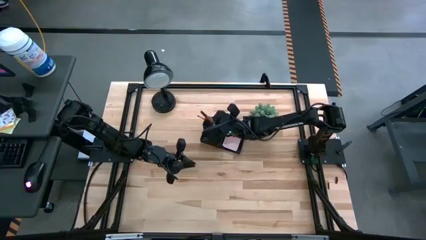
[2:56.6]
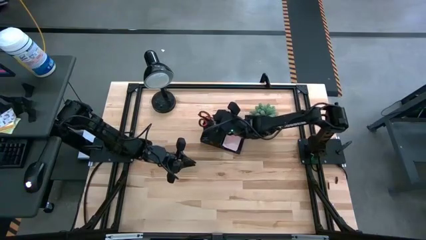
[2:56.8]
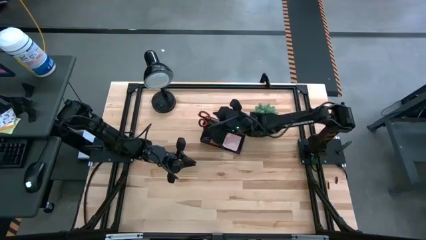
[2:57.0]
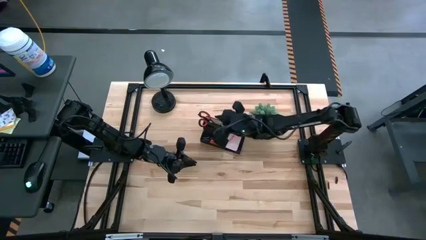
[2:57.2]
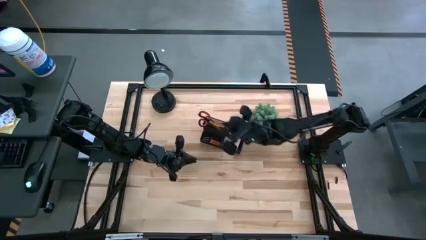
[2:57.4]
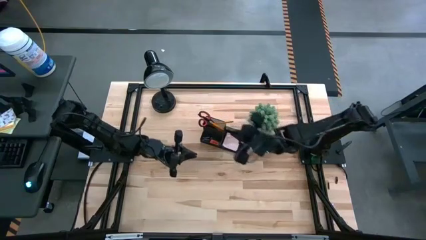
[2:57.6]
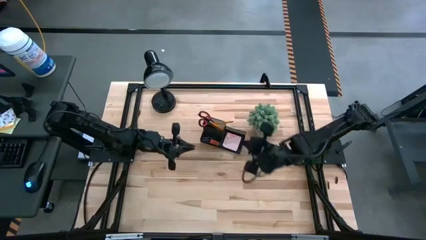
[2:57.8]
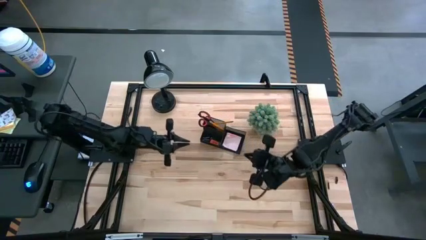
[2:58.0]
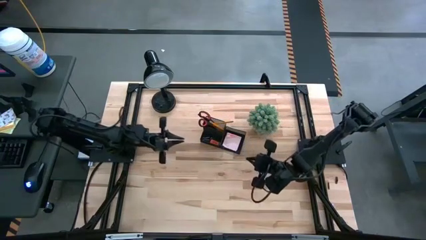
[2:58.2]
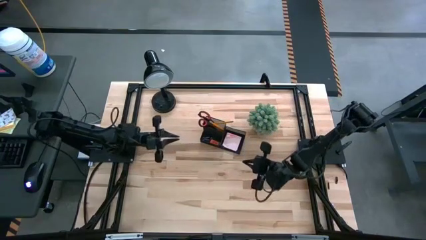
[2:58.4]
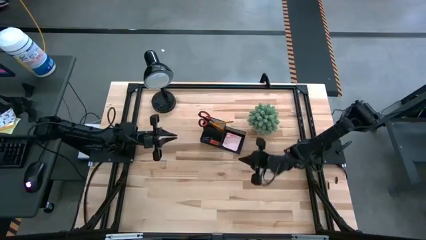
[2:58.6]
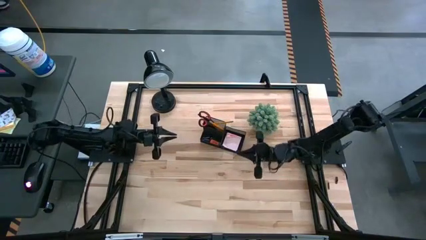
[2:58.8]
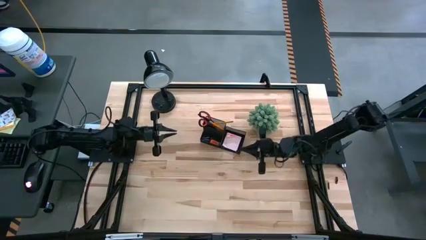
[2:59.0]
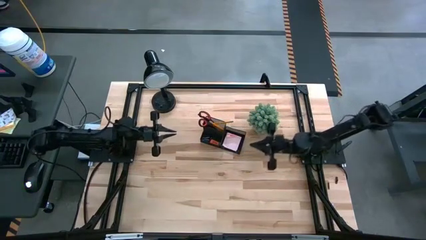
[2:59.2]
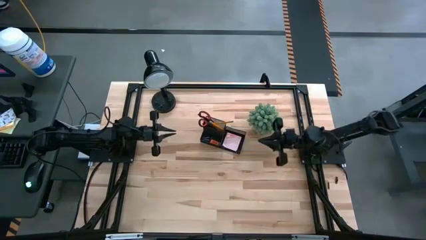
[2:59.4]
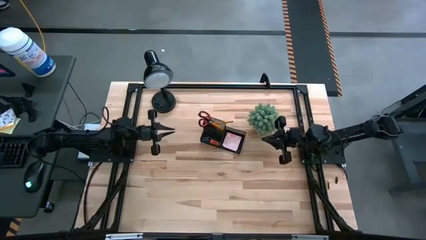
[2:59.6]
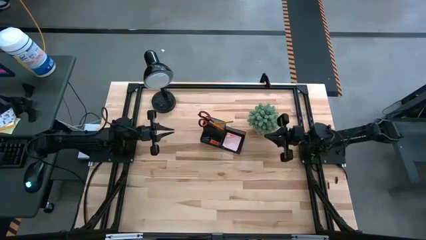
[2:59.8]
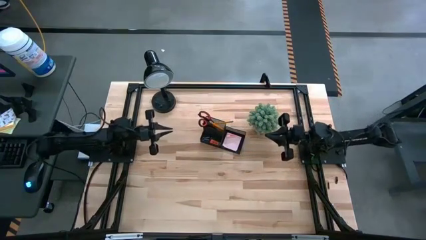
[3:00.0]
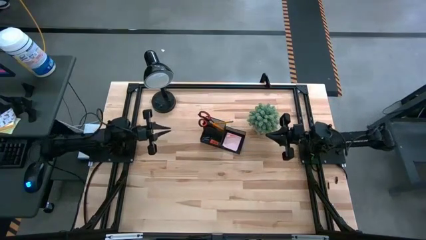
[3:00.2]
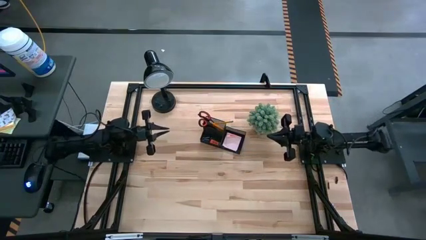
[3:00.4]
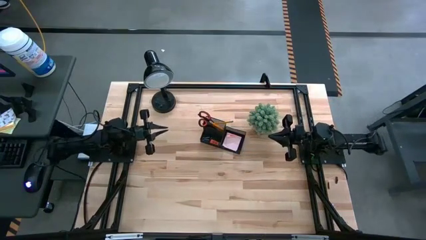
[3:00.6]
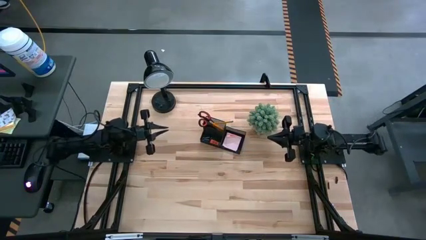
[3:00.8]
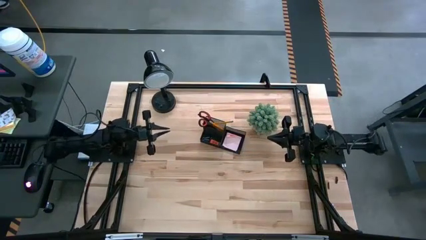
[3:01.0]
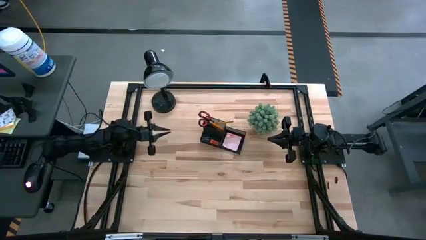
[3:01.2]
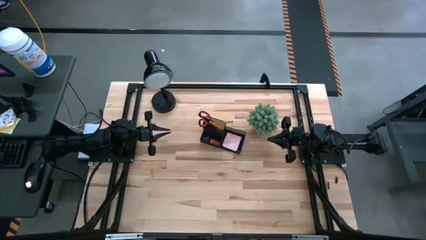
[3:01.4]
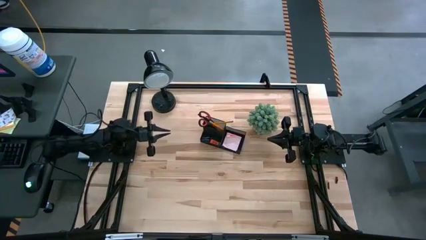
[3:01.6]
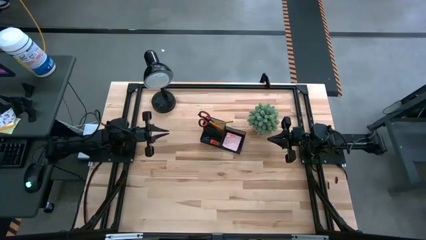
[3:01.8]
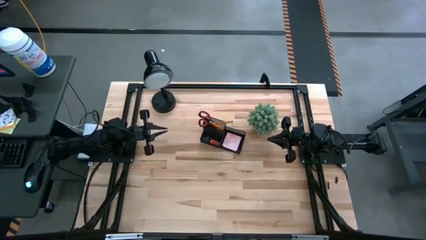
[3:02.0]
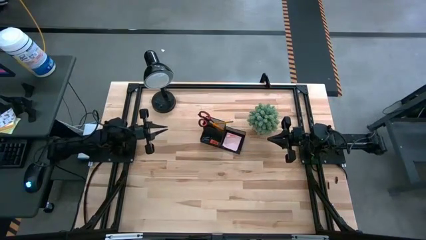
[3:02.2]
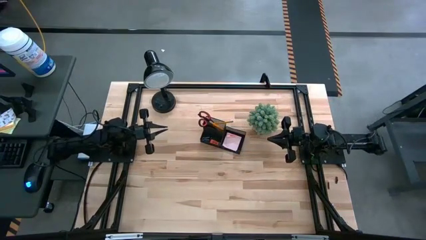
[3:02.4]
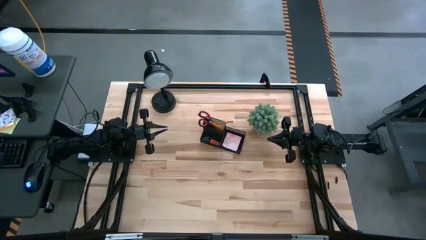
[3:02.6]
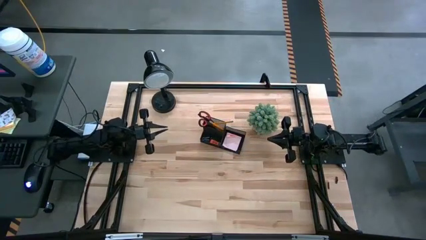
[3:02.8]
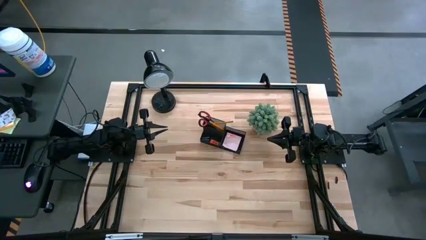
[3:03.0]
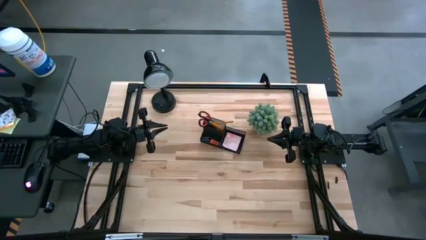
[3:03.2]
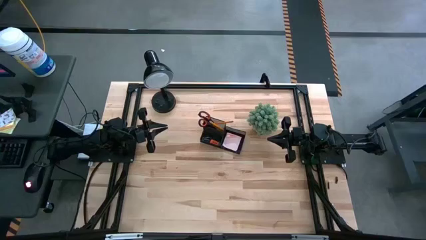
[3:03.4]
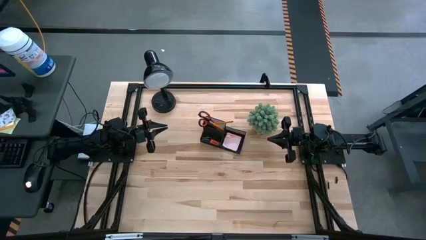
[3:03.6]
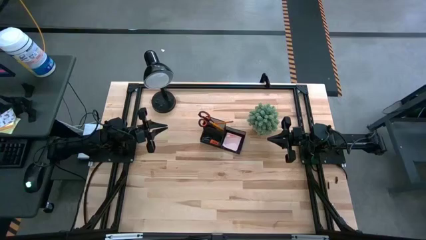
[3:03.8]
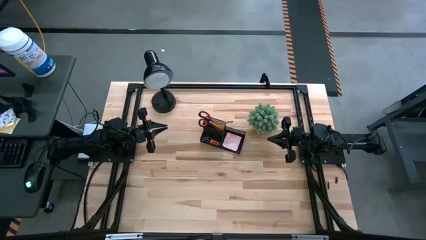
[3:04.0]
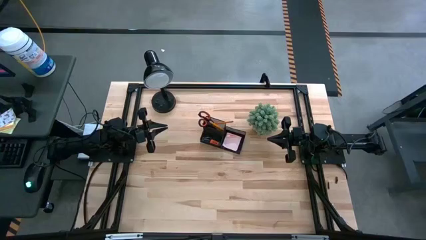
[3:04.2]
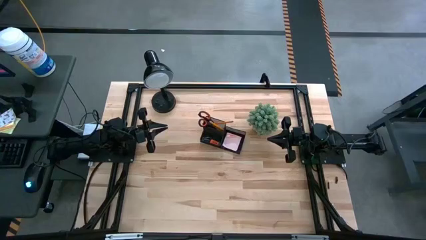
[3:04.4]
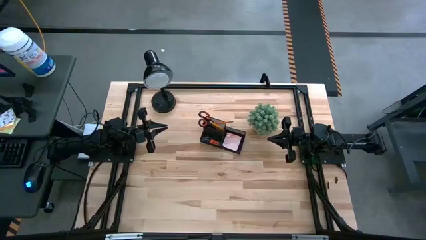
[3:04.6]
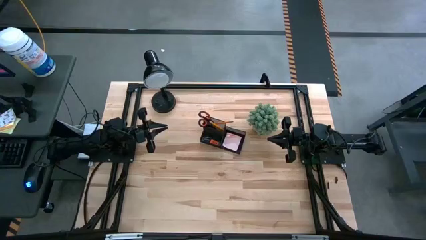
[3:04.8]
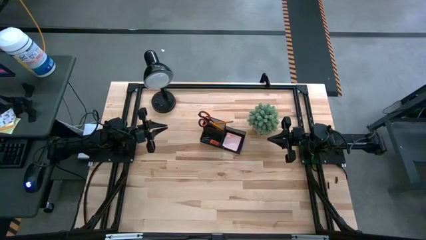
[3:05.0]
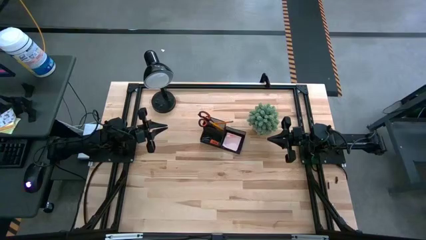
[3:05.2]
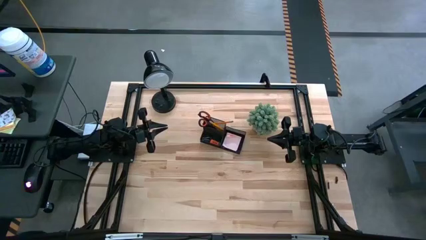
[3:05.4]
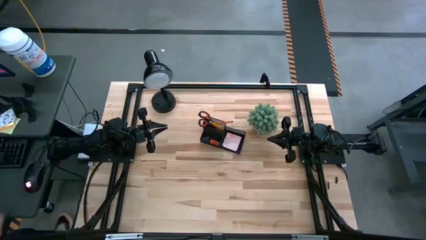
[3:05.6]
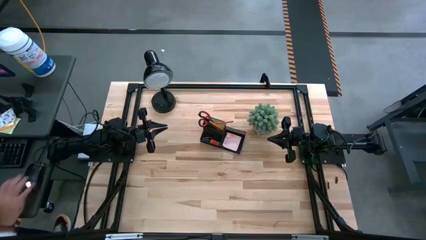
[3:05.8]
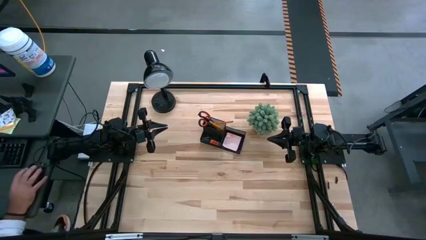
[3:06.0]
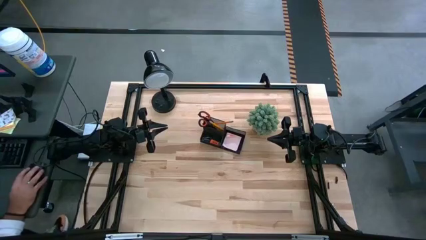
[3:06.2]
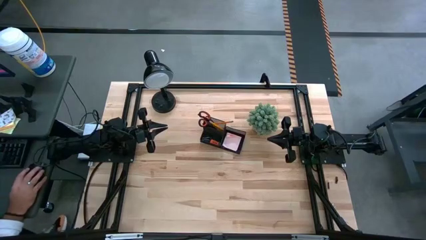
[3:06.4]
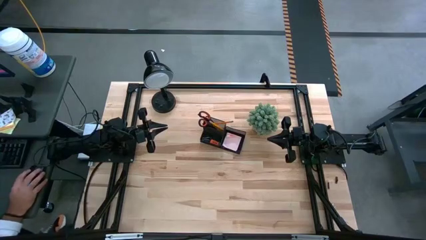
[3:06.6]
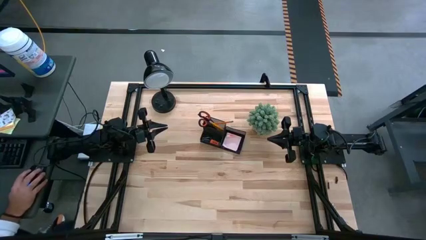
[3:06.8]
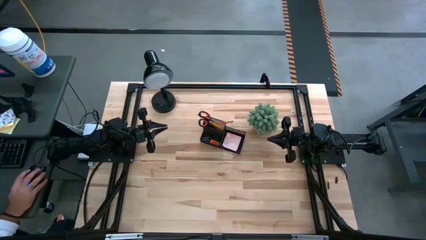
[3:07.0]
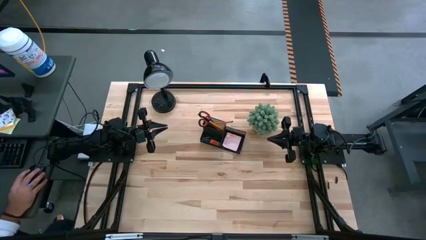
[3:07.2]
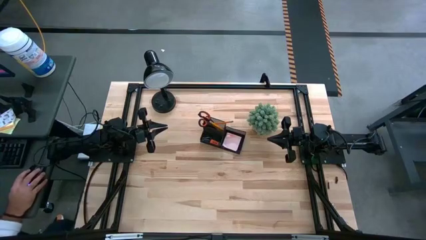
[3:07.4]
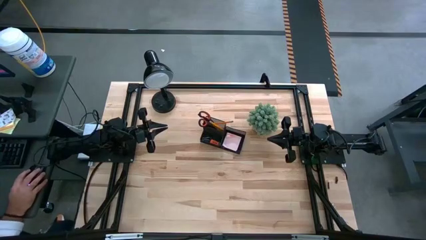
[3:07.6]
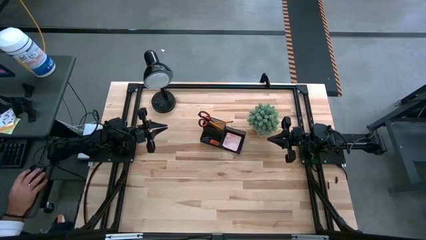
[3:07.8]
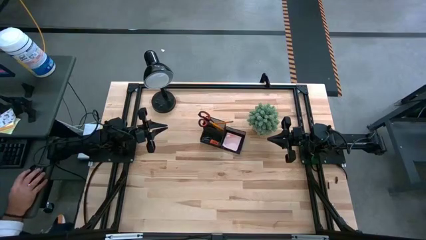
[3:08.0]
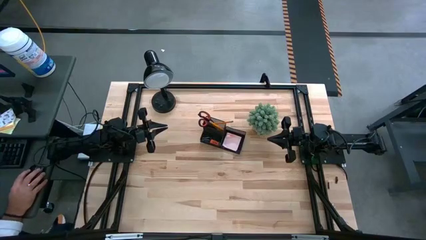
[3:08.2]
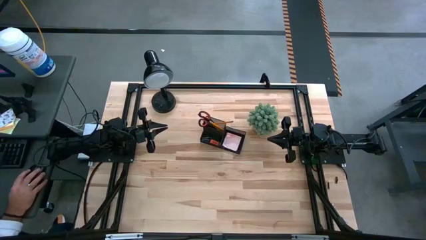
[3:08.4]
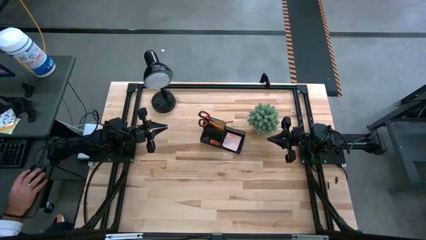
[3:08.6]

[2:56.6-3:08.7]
Task: Pick and place office supplies into organizer
Return to Home Position

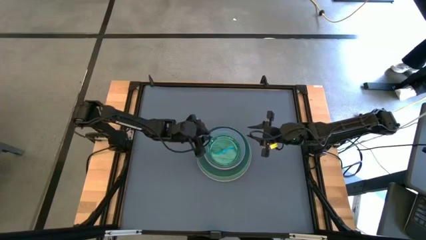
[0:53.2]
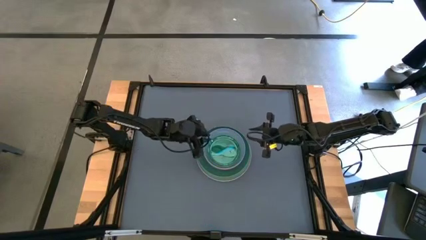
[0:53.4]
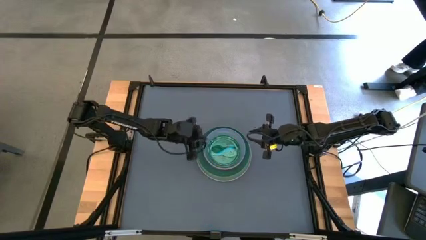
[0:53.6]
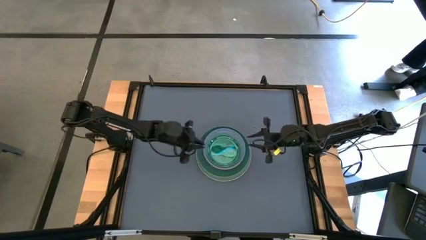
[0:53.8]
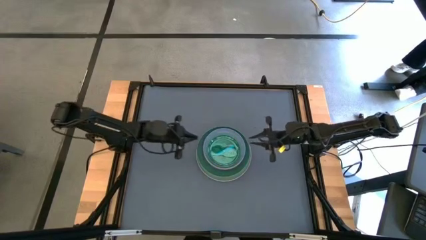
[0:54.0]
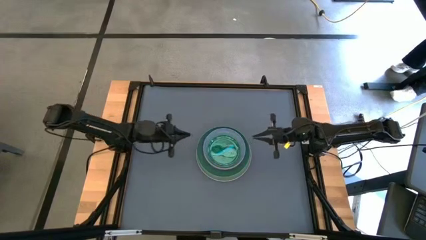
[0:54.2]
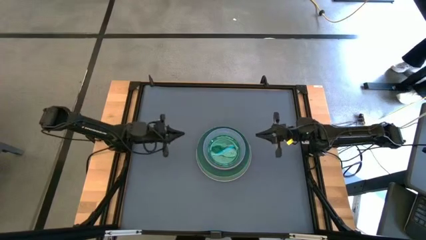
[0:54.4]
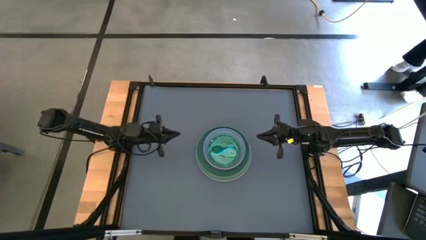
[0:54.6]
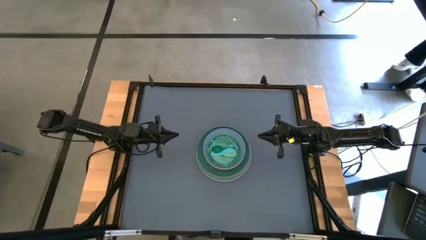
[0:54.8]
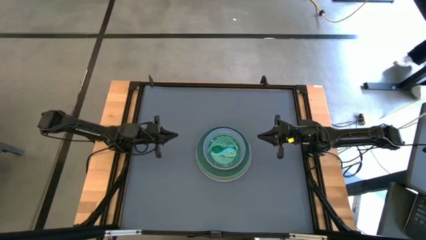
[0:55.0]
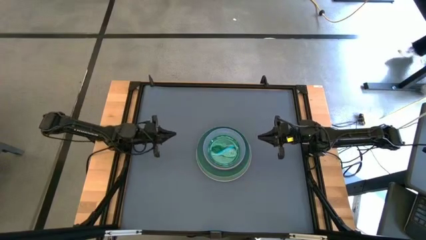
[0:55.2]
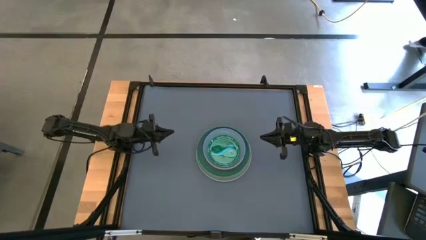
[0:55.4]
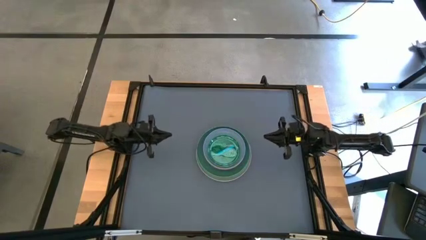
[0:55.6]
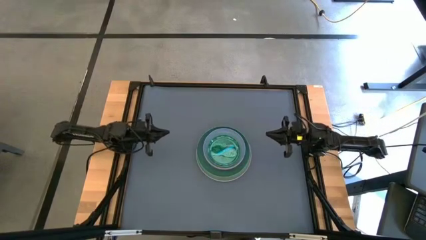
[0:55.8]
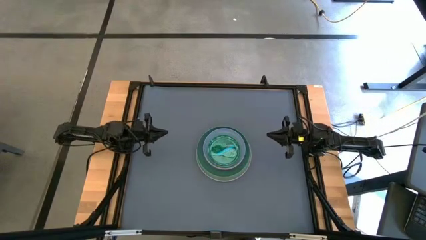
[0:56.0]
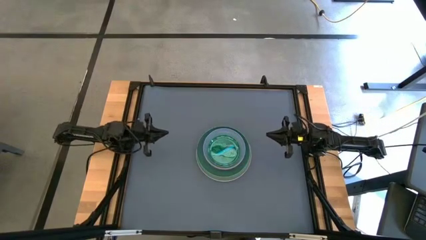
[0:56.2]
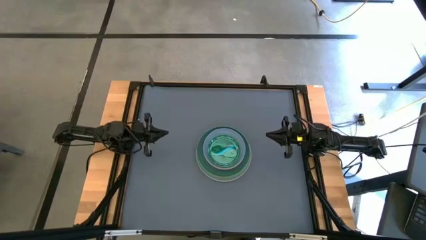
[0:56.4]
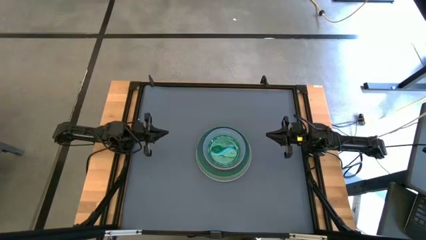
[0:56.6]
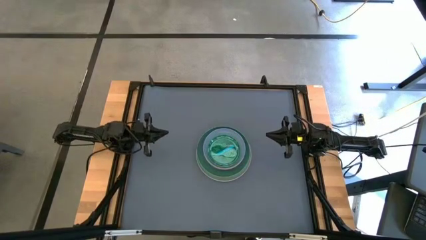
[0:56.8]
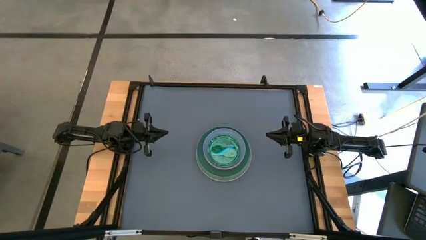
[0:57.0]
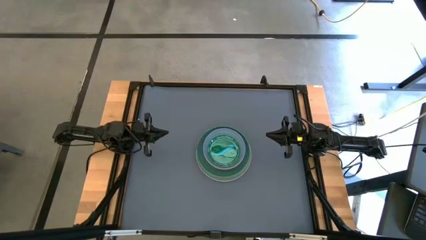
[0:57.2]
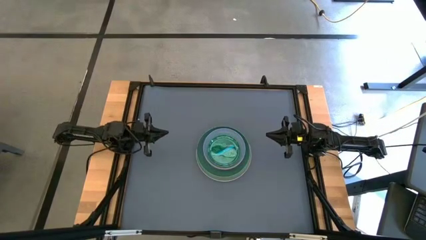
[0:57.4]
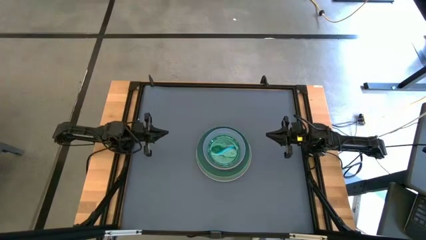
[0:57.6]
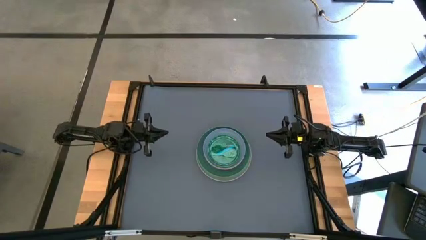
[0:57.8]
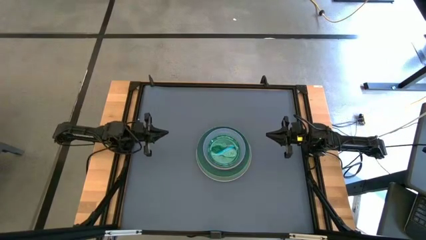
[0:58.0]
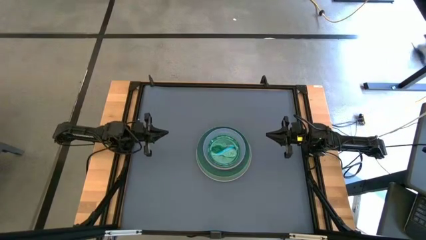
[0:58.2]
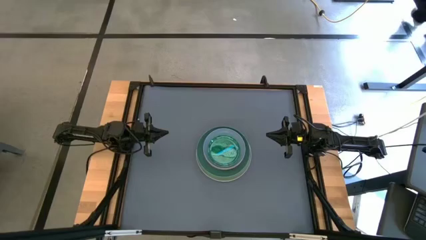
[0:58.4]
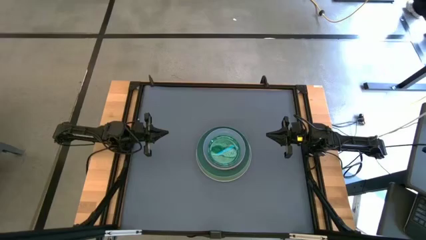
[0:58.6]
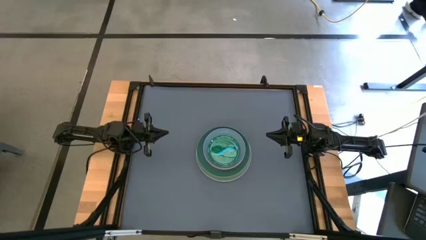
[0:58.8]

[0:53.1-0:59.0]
Task: Stack plastic plates
Return to Home Position
